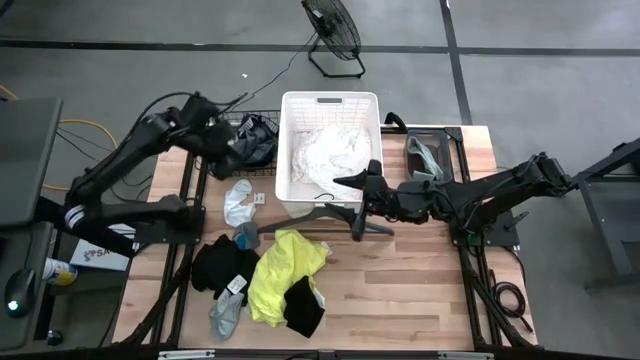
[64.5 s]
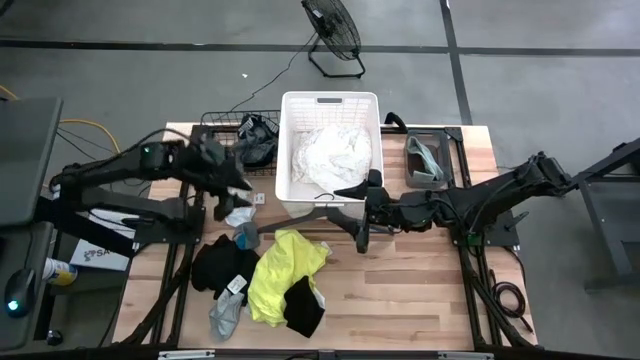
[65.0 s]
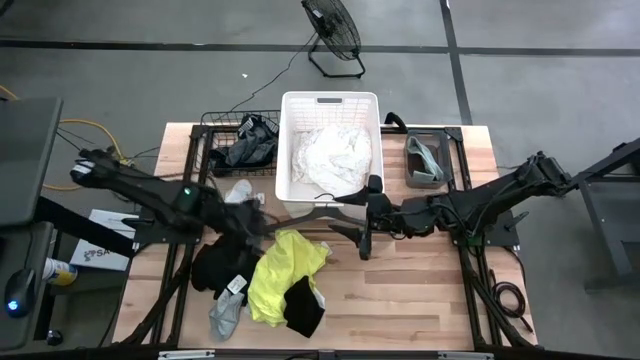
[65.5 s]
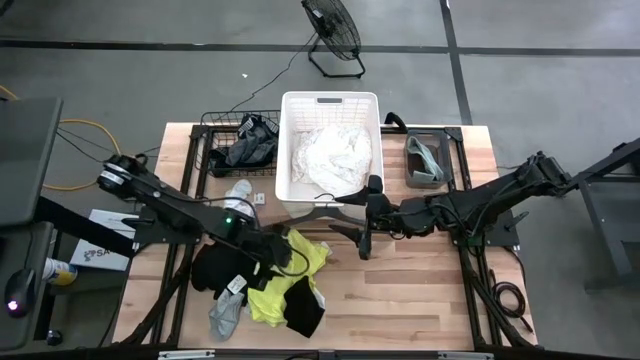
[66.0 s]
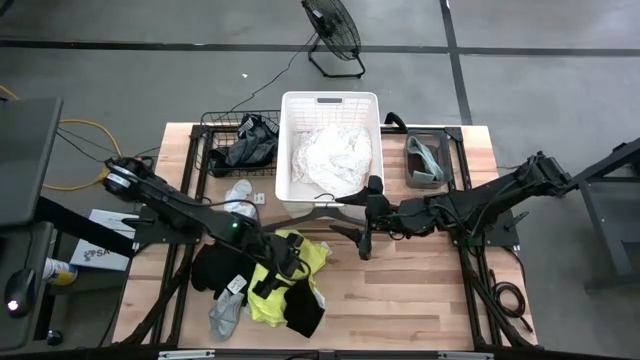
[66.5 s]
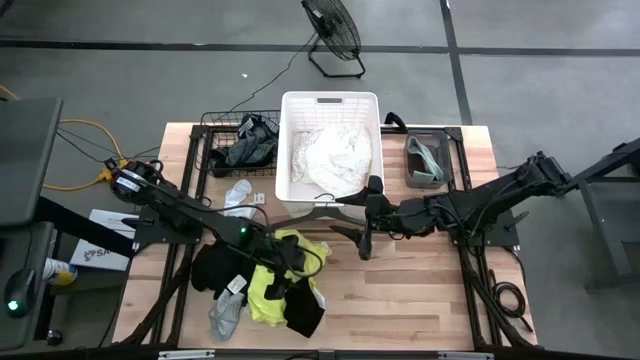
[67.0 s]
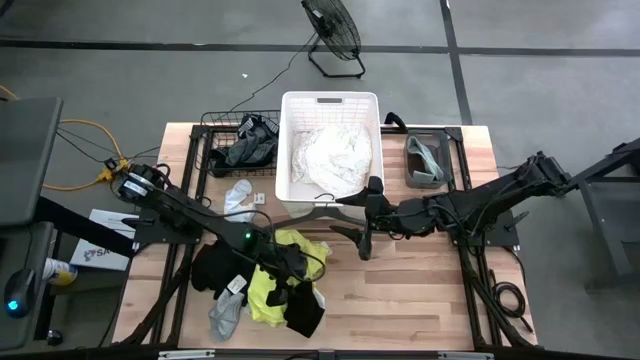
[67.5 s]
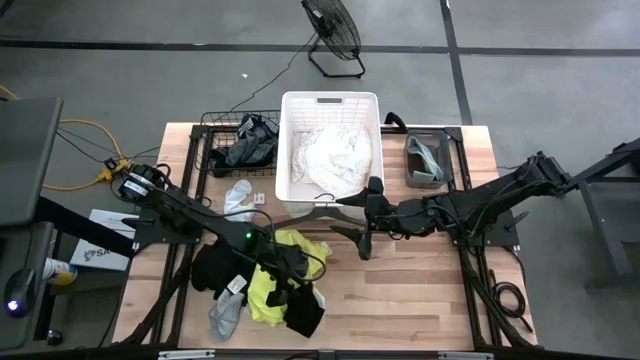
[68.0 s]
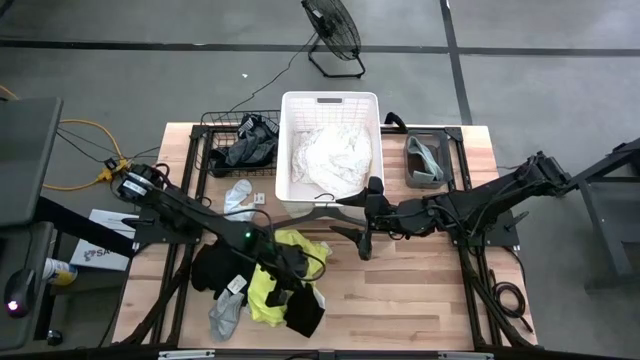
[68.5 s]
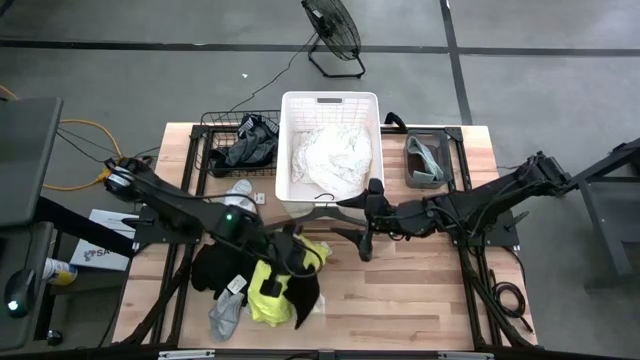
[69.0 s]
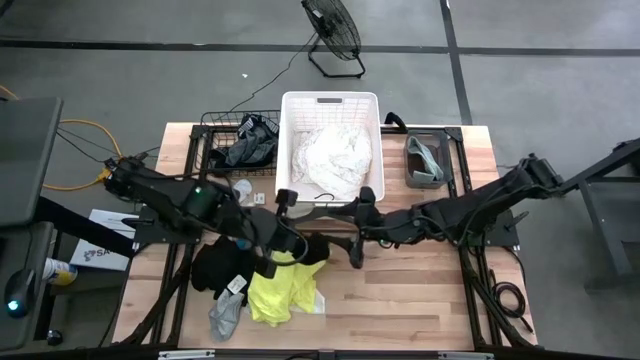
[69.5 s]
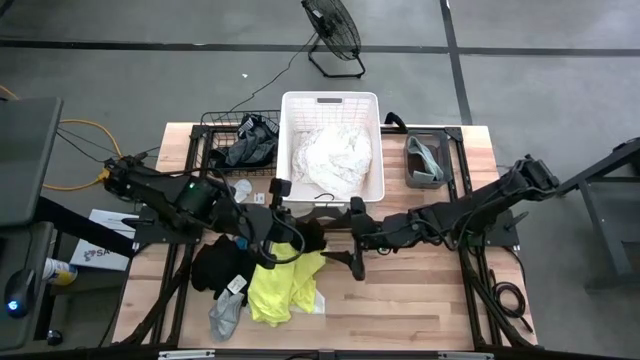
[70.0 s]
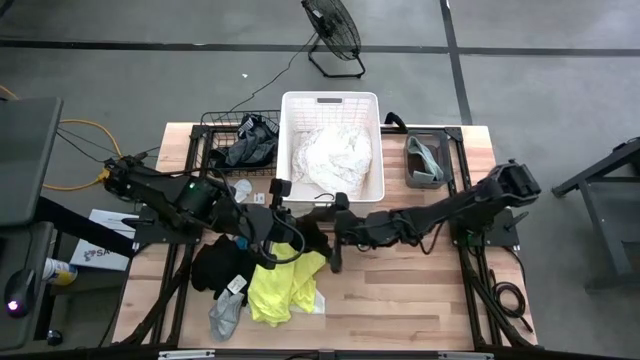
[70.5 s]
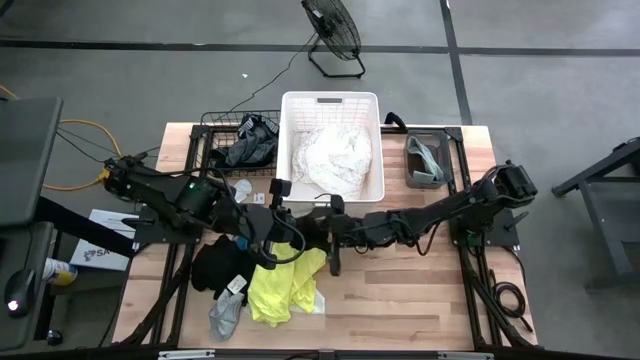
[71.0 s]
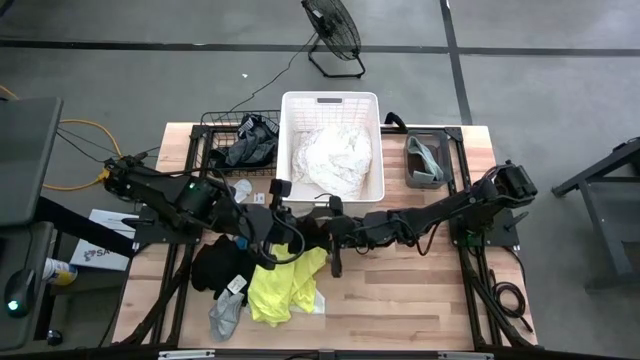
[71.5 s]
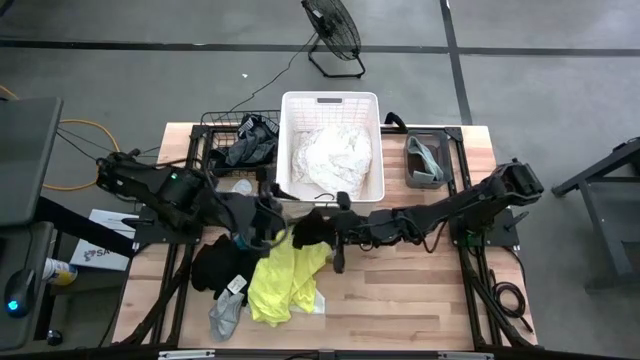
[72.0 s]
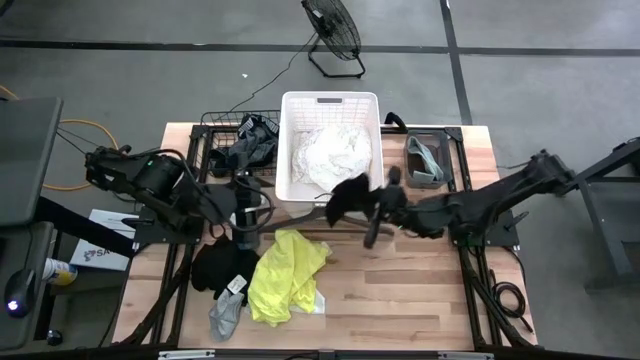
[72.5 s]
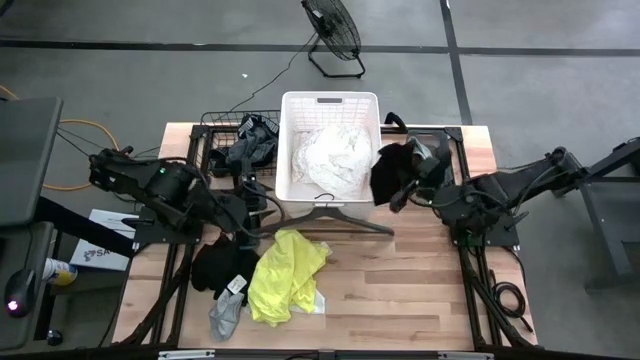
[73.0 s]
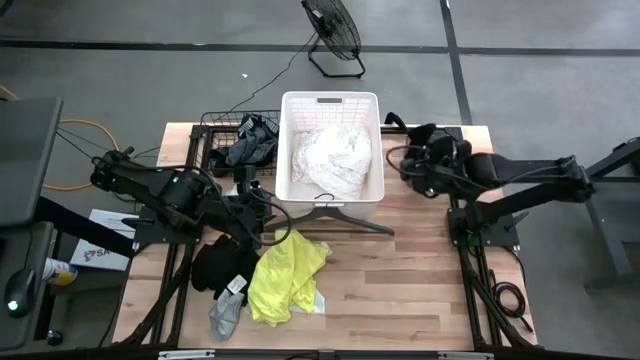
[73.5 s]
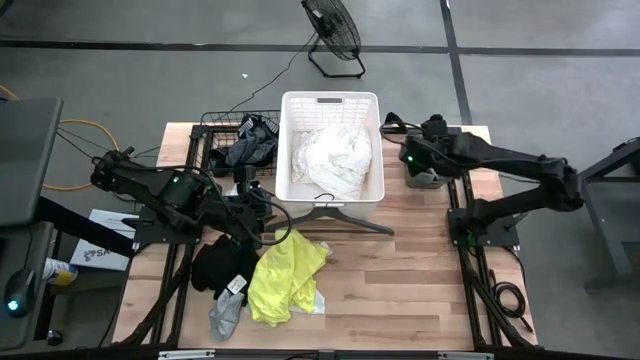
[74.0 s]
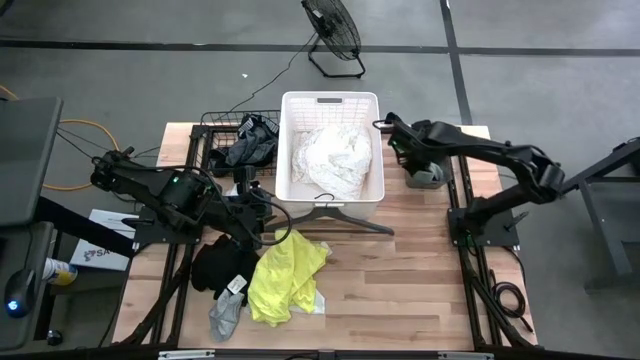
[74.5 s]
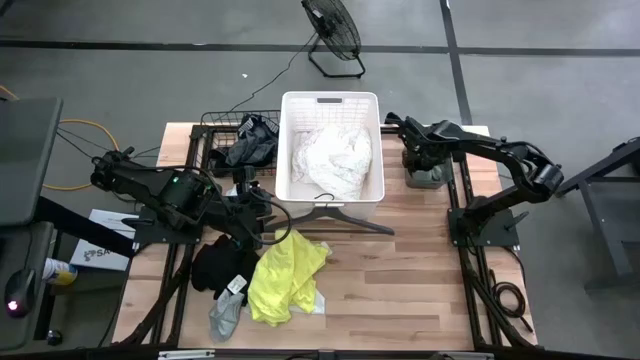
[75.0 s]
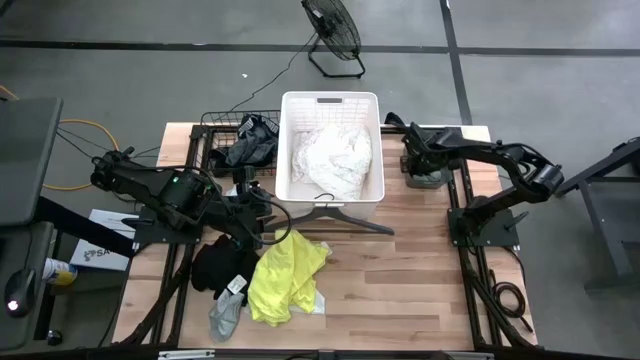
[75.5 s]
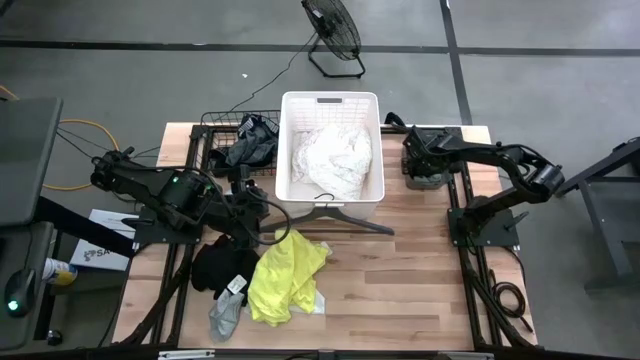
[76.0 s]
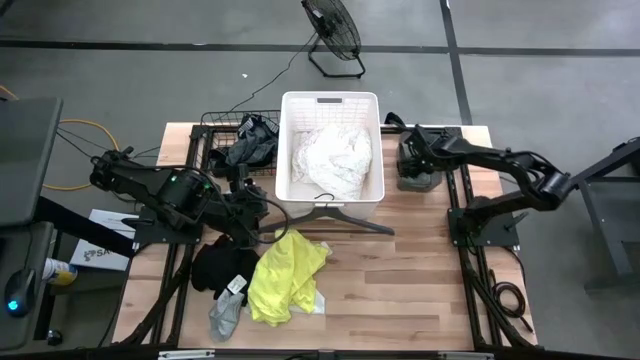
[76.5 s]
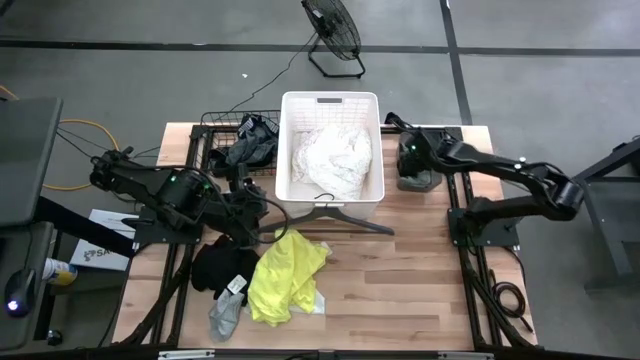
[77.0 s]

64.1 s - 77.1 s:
Task: Pick & Place Cloths
Put the black sock into the black bin

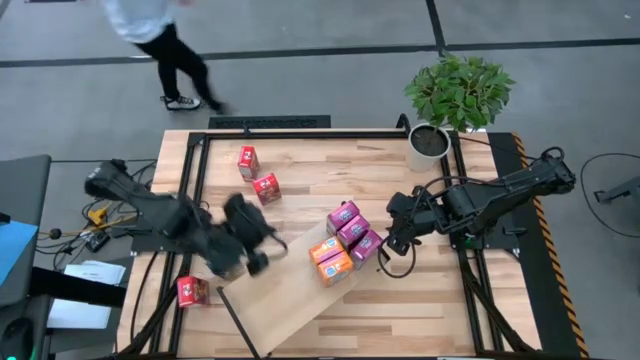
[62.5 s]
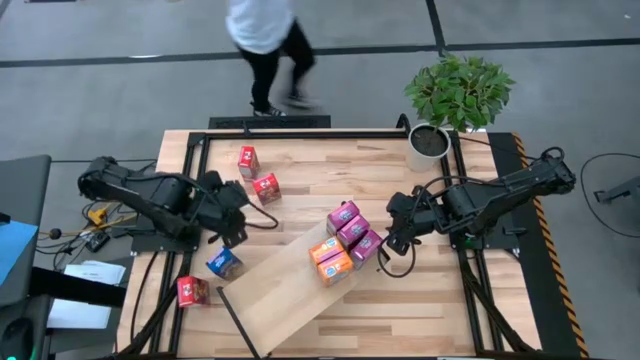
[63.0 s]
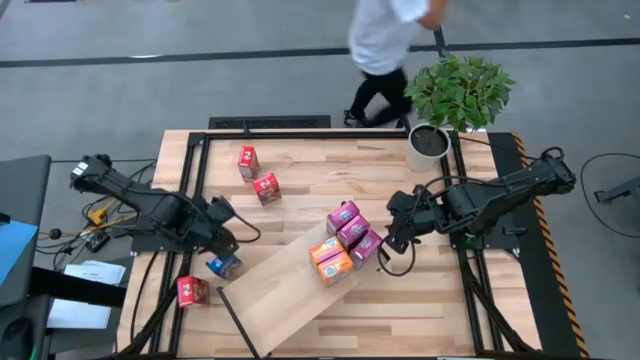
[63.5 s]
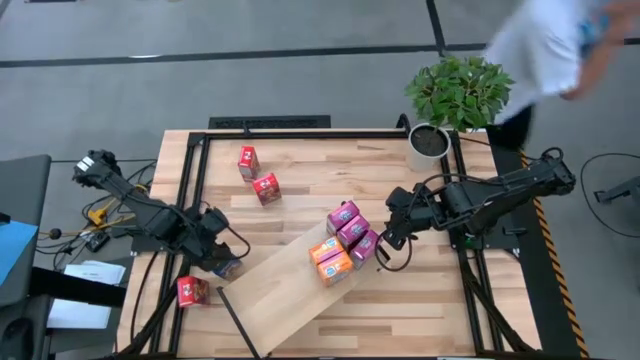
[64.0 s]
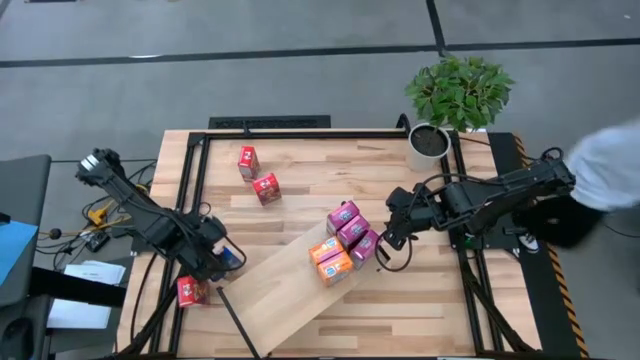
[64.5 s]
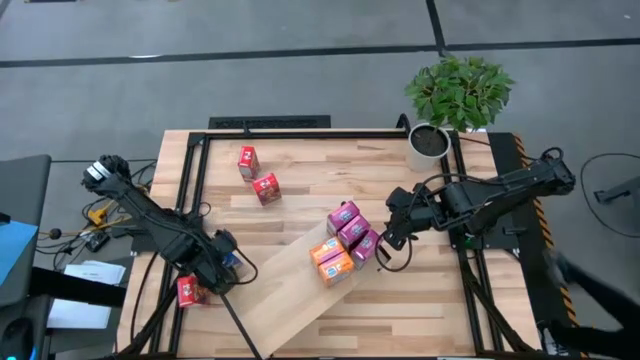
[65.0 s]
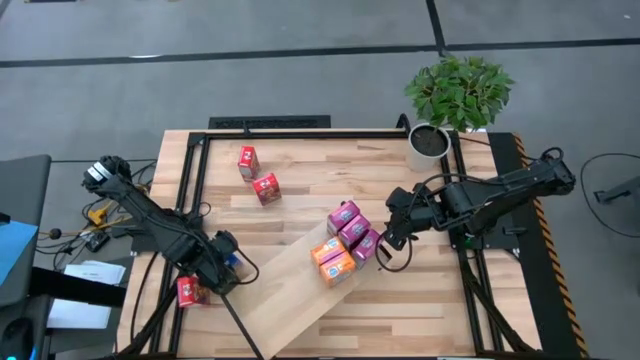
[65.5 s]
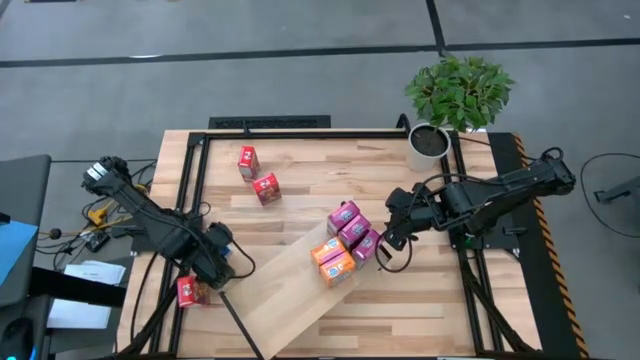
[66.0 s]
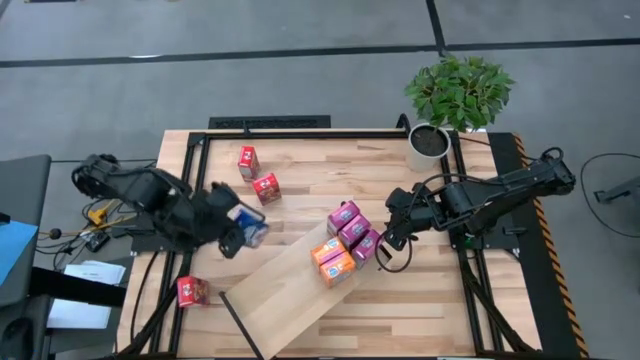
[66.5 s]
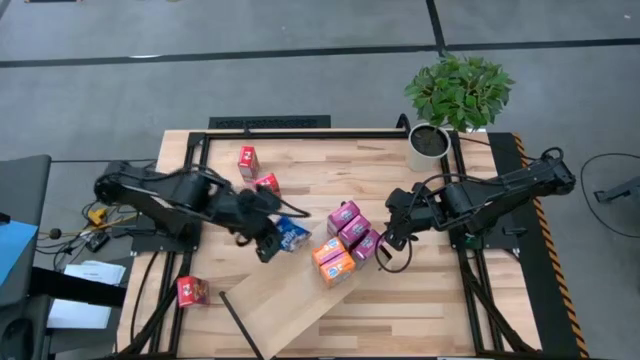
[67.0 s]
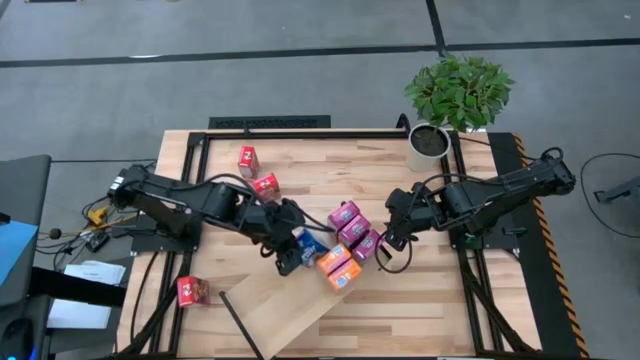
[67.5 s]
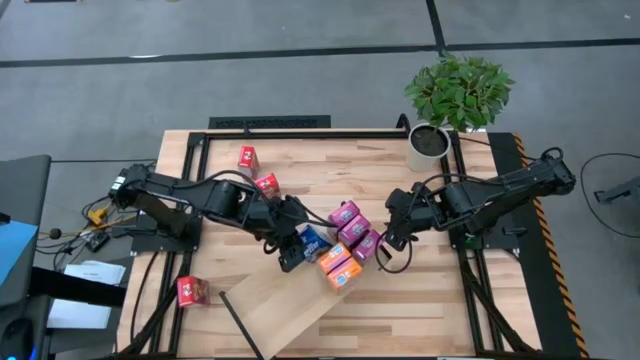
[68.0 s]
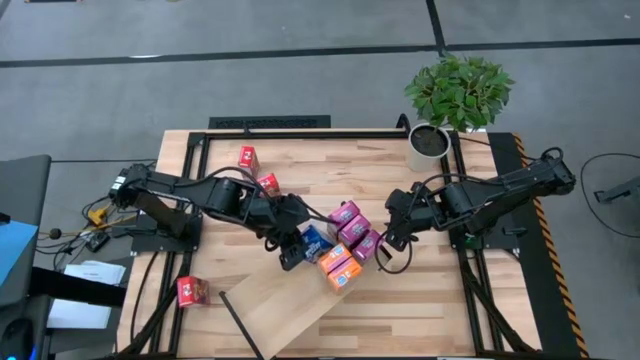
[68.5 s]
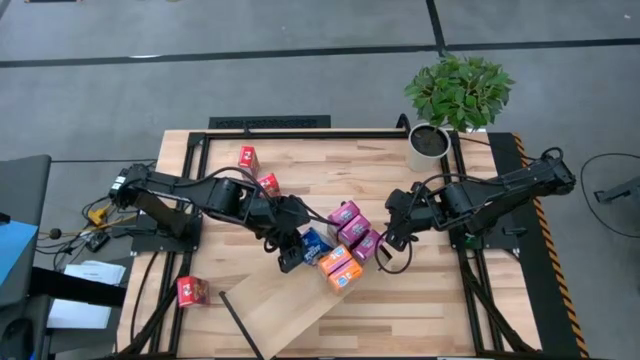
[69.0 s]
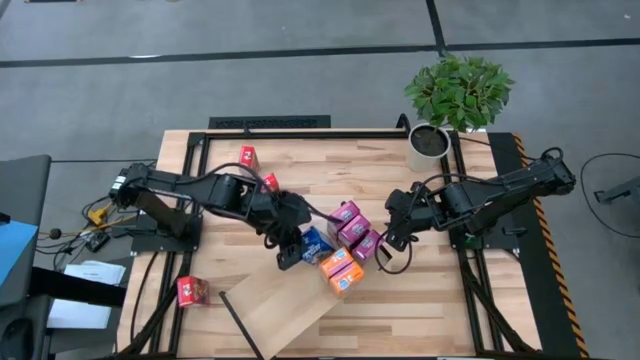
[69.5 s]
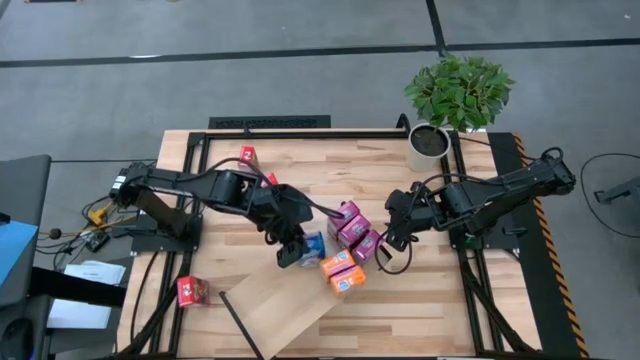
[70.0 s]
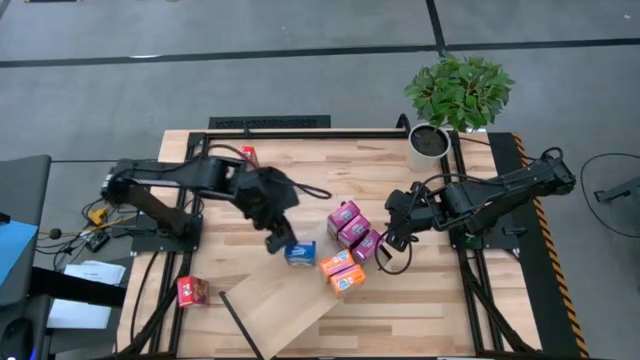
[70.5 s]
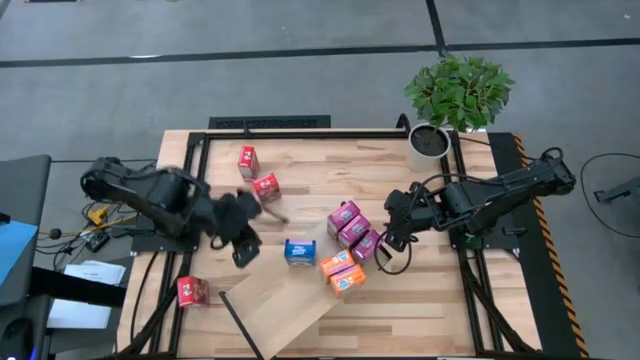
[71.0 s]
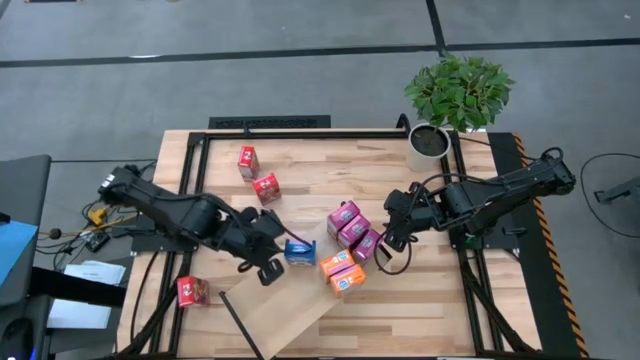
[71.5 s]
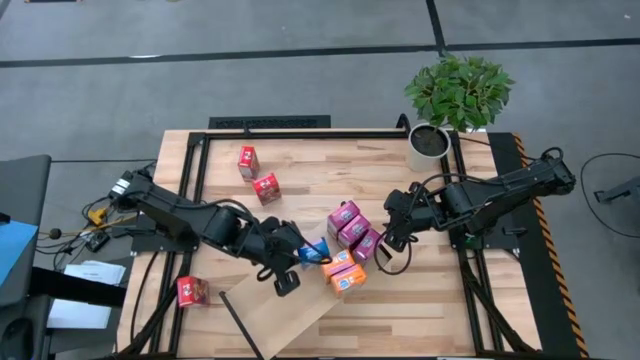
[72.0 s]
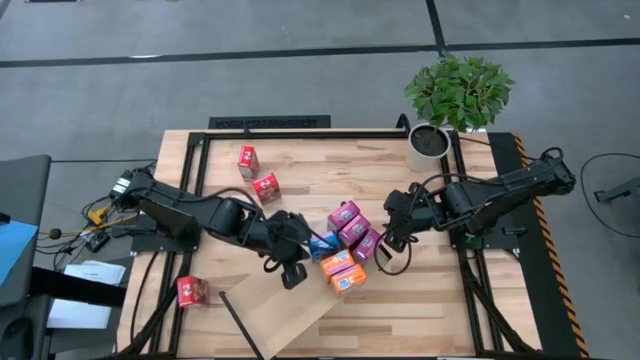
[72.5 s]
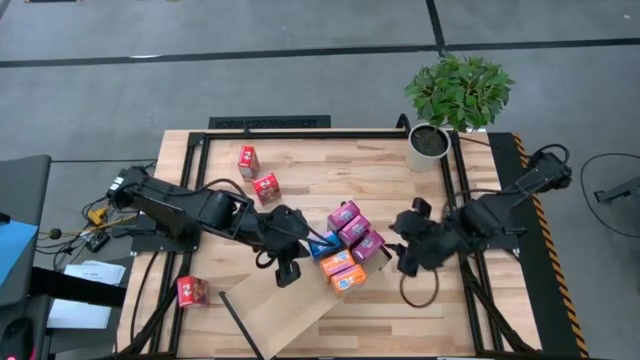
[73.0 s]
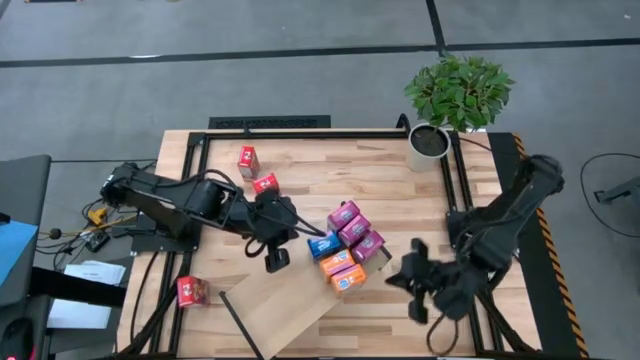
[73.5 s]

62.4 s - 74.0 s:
Task: Stack cereal on shelf
Put the blue cereal box onto the shelf
